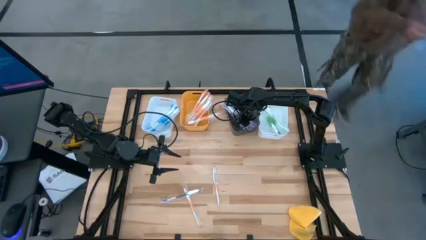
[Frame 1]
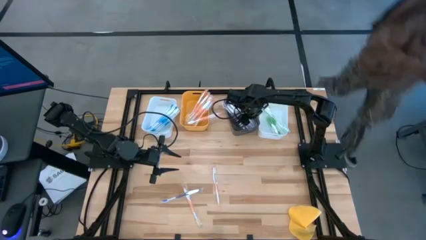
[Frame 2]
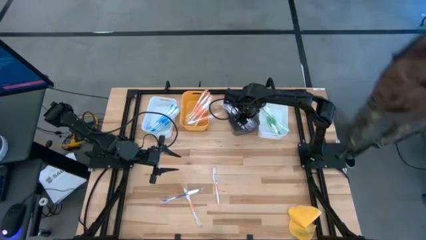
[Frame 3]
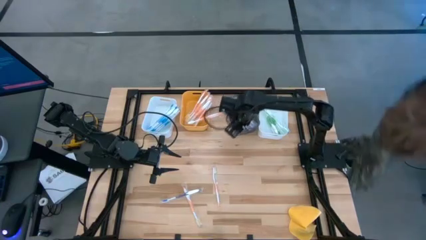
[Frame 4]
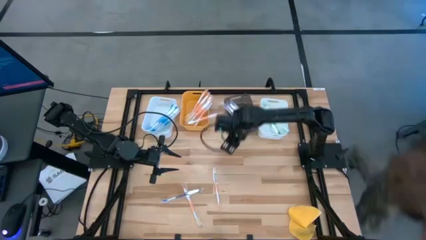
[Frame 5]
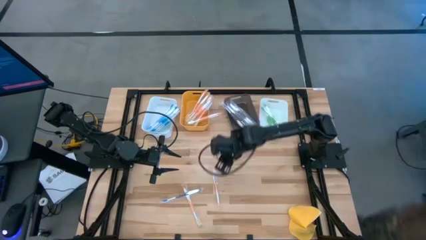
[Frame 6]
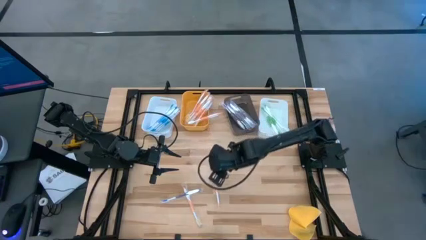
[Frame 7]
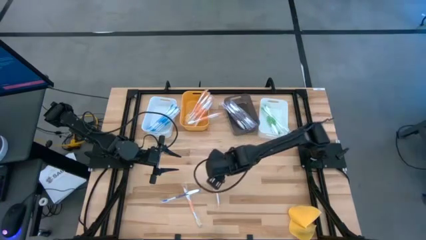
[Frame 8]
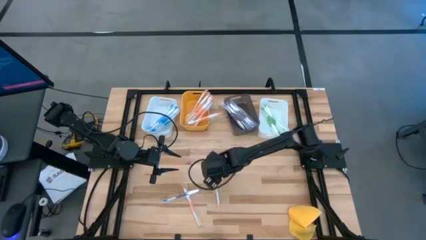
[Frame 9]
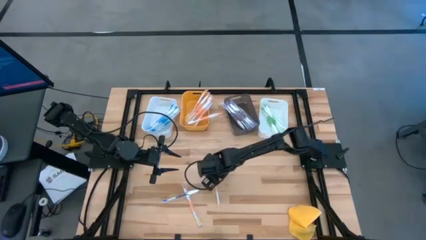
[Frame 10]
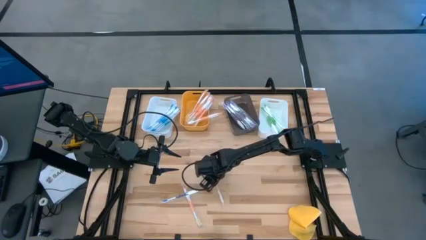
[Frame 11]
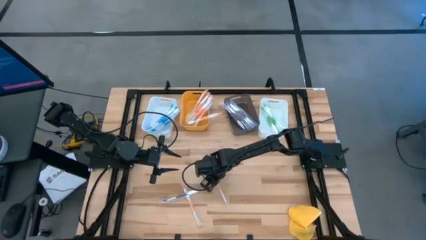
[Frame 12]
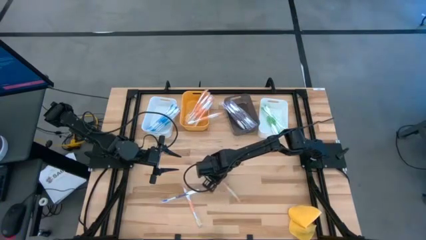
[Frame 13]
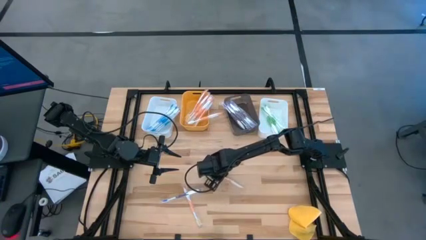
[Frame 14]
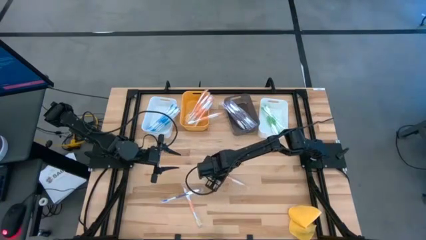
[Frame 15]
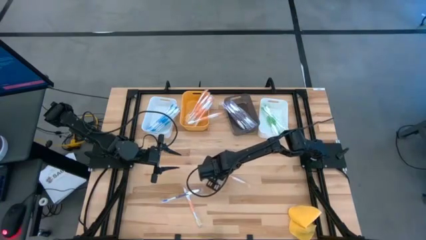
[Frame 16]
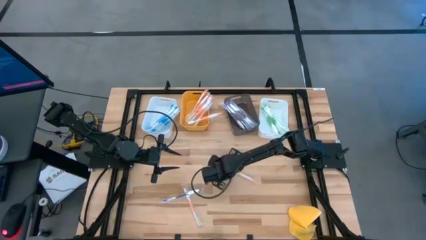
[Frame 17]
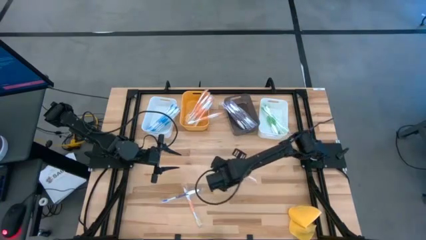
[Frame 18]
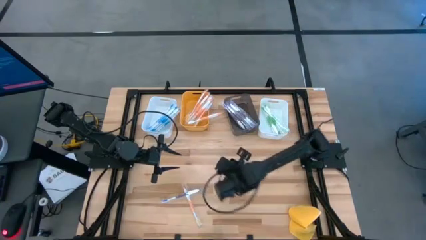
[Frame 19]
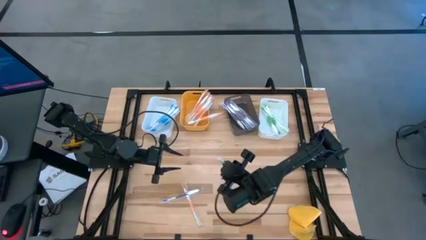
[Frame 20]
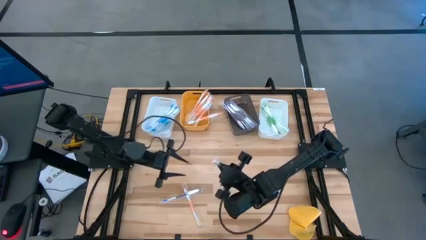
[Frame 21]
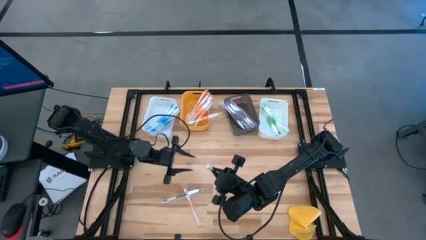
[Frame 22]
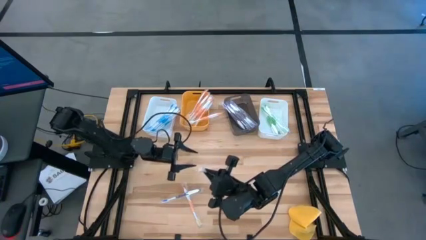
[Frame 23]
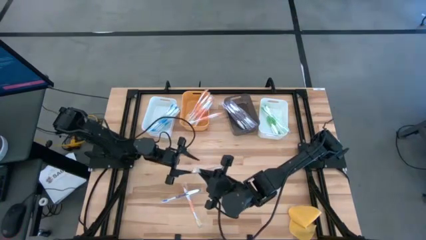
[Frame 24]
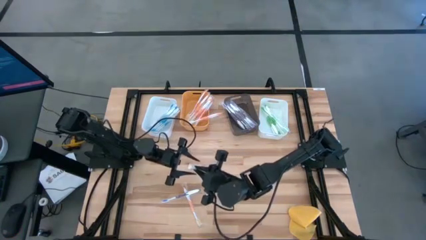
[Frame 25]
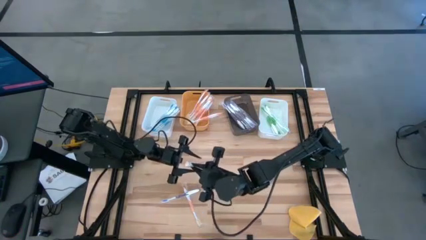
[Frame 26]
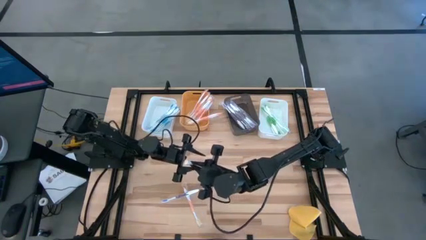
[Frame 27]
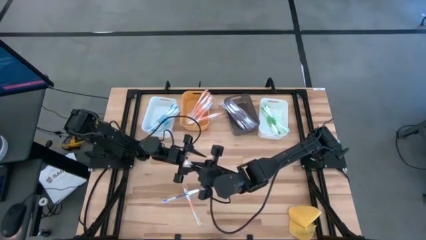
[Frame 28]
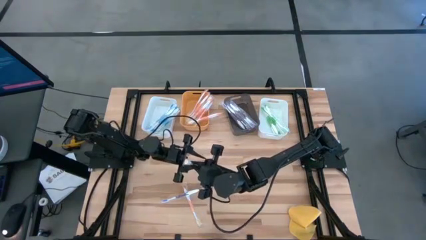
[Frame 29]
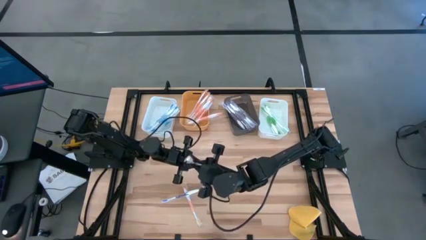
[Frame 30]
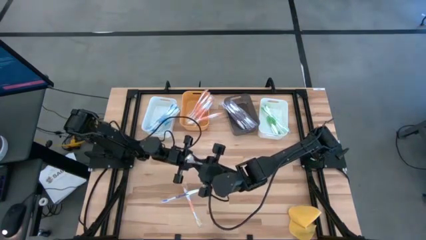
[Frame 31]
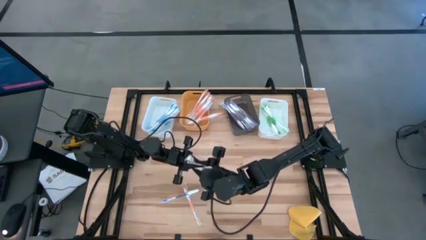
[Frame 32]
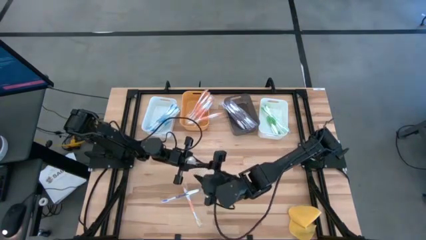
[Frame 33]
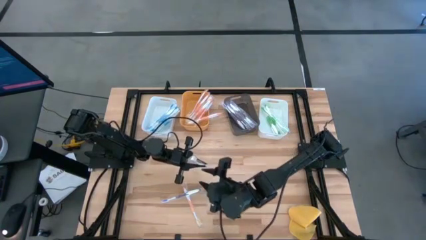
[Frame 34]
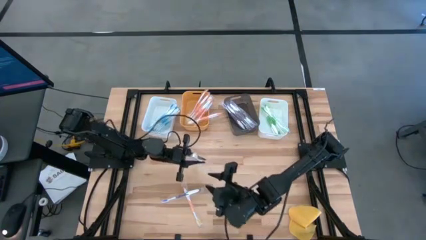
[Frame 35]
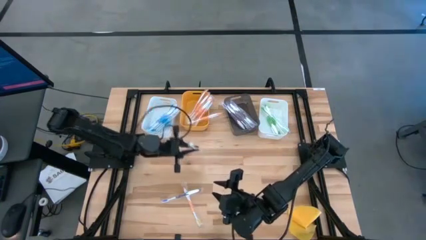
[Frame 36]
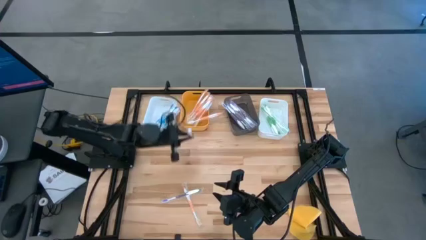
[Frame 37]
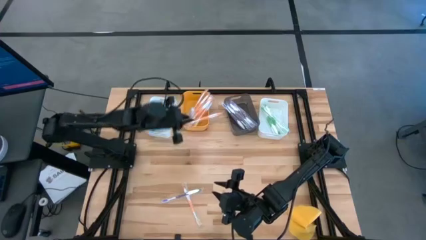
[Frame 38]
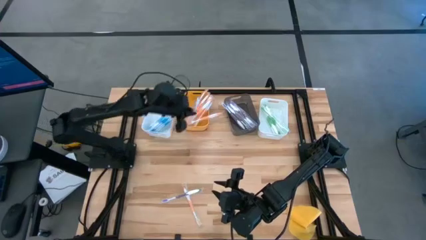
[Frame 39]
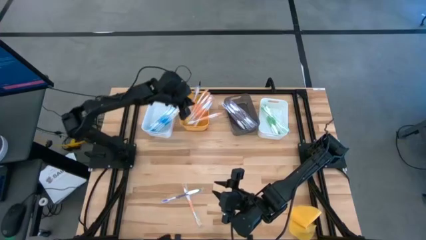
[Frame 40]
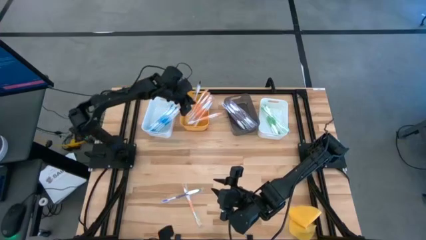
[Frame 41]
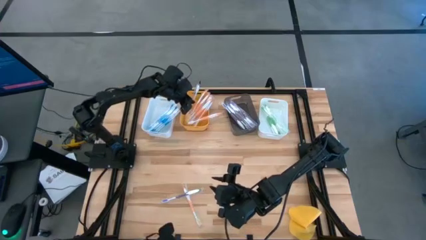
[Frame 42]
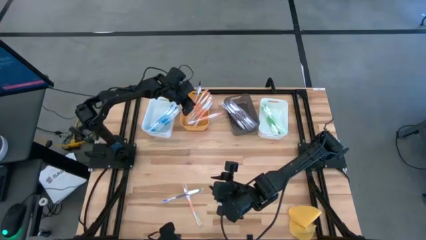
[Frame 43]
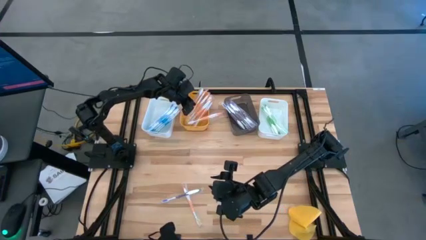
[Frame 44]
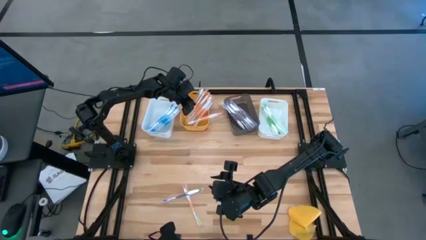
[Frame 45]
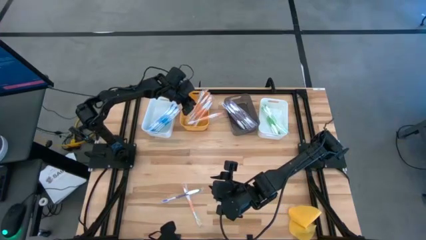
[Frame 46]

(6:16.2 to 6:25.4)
Task: Pick & Place Toothbrushes
Put the orange toothbrush into the yellow bin

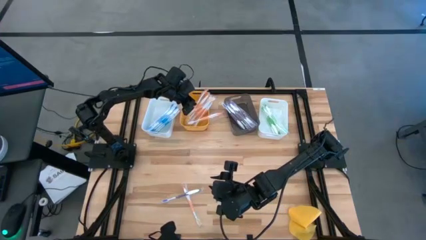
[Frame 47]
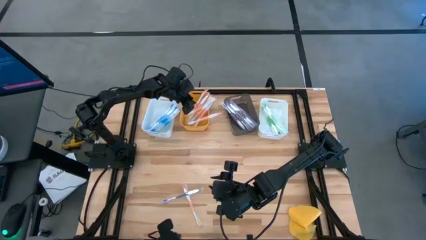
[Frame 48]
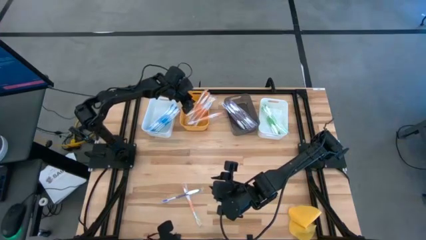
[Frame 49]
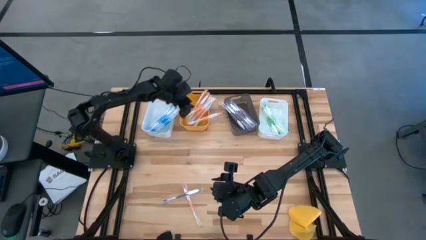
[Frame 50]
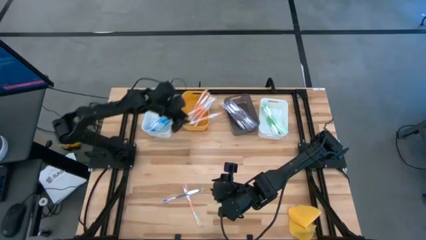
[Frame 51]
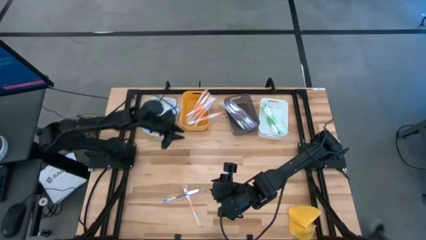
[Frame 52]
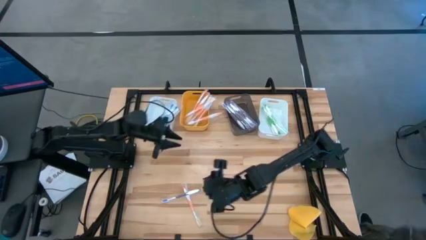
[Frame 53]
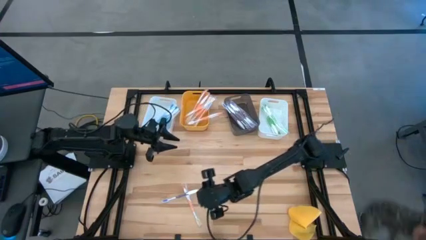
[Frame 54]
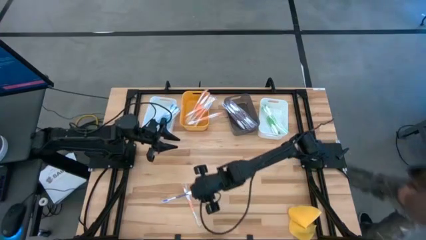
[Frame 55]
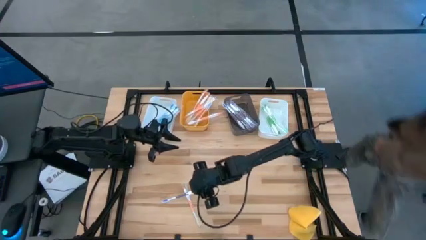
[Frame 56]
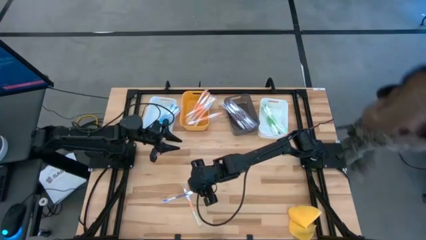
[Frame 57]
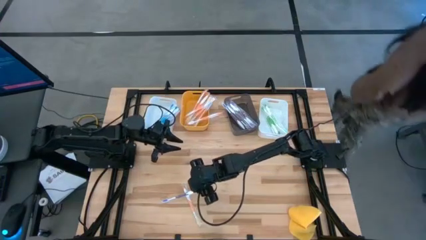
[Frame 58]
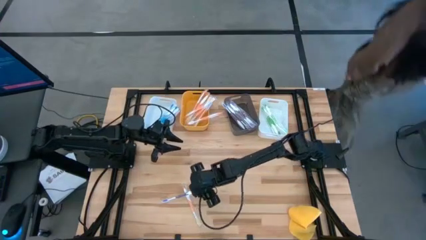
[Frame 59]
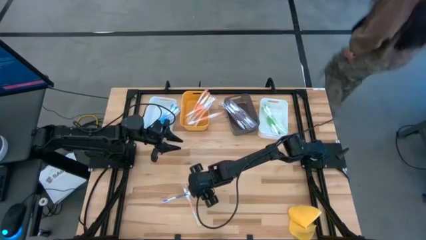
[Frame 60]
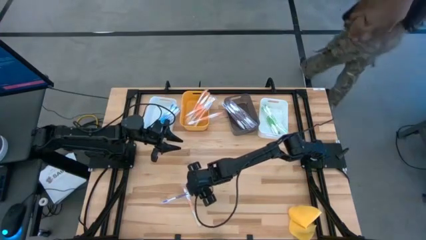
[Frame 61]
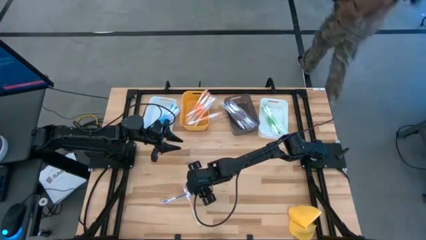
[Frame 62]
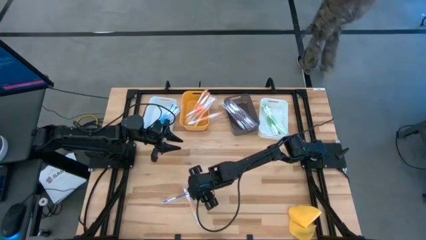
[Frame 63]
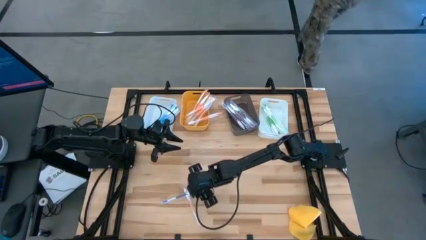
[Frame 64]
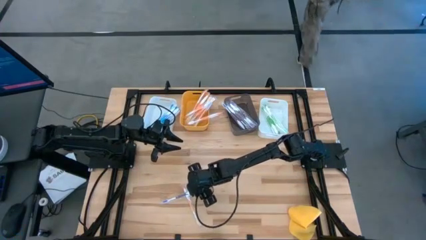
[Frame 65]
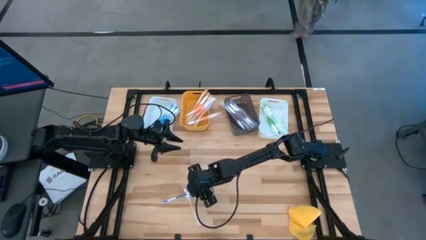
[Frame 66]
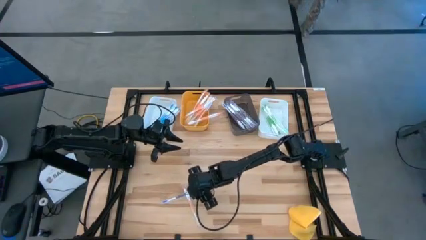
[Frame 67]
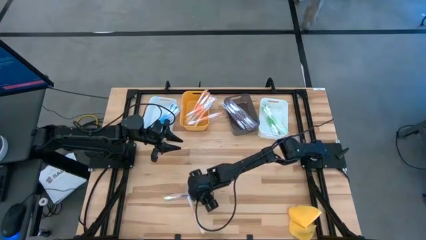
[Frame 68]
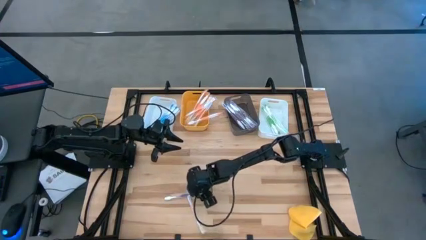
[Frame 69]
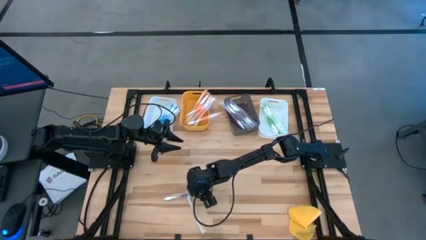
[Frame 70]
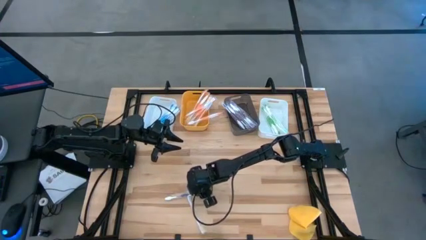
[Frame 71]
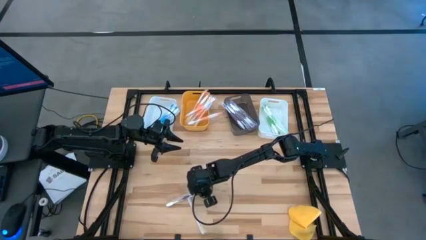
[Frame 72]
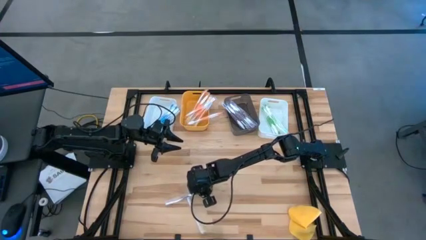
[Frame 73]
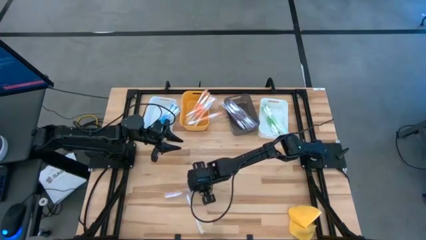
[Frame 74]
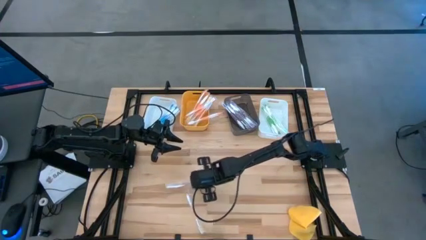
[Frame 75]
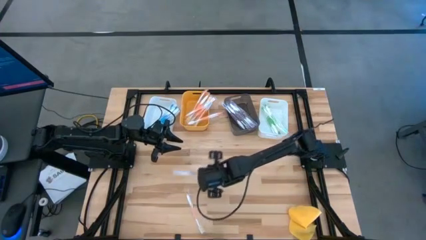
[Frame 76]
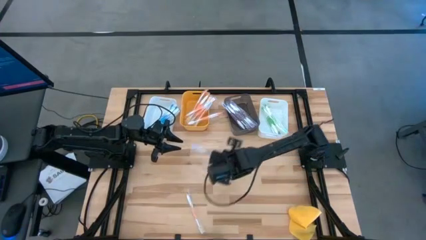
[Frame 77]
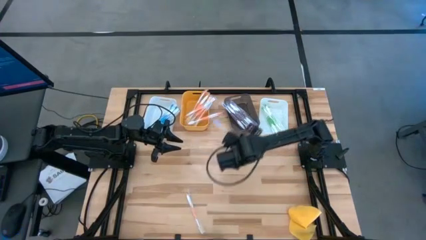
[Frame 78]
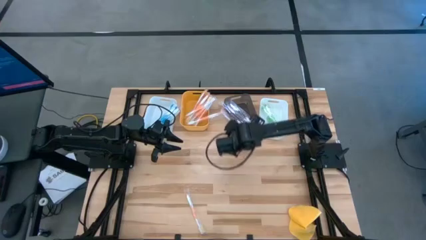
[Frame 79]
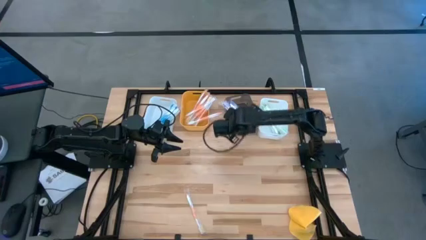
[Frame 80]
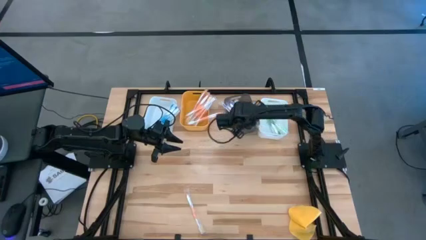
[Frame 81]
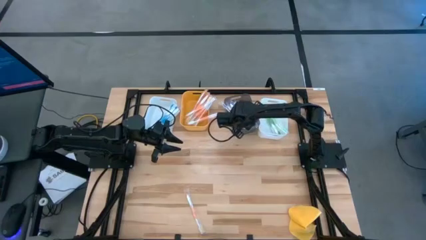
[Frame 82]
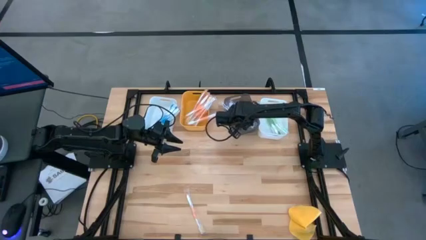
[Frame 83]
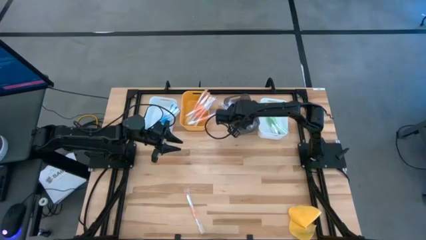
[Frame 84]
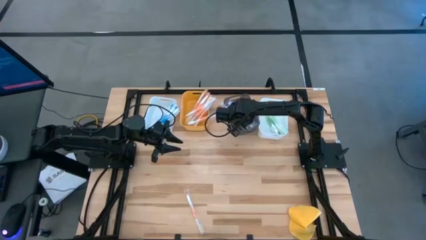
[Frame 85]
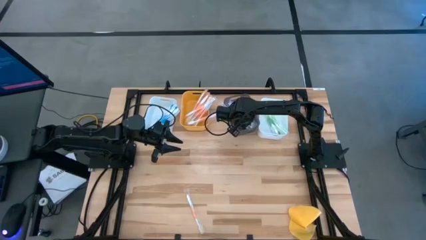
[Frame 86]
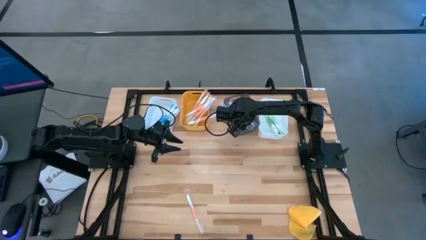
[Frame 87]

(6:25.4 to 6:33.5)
Put the violet toothbrush into the gray bin
